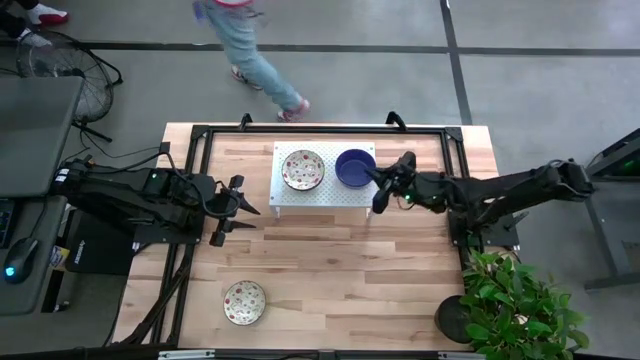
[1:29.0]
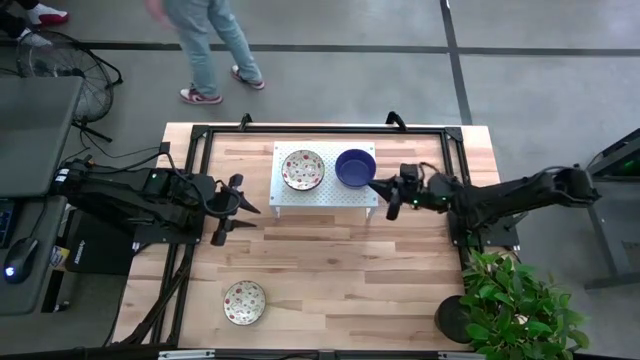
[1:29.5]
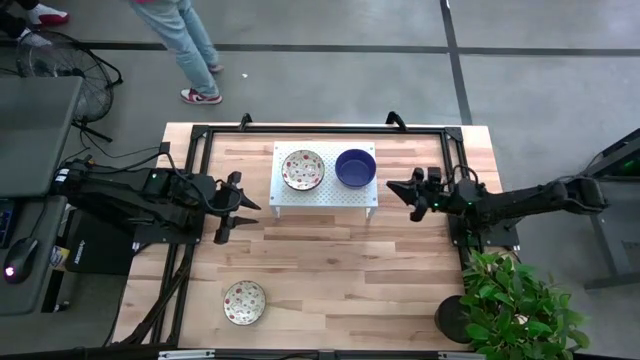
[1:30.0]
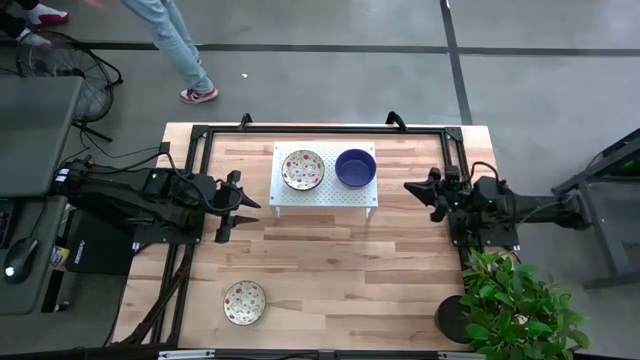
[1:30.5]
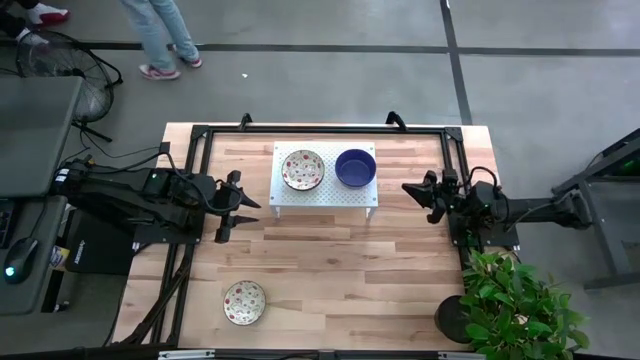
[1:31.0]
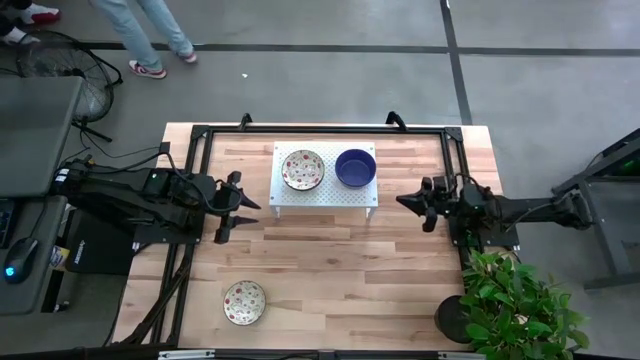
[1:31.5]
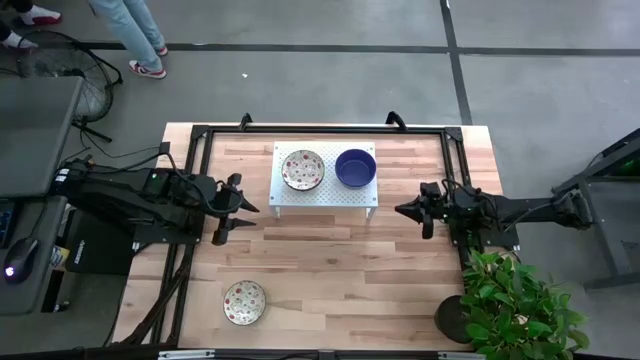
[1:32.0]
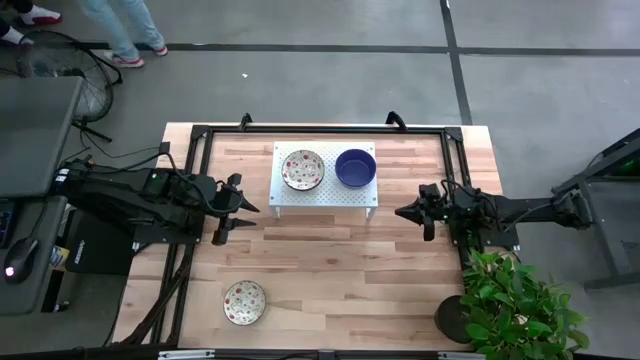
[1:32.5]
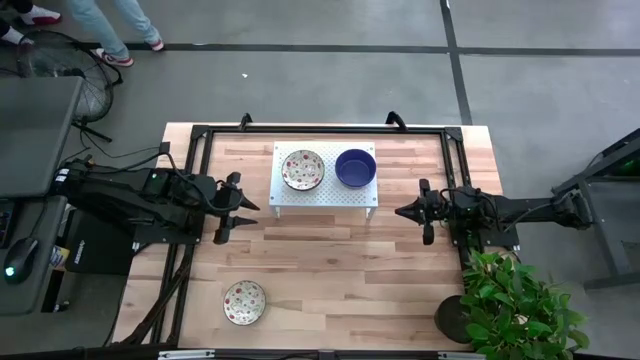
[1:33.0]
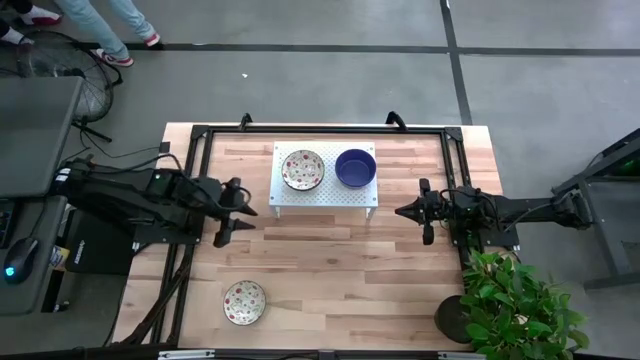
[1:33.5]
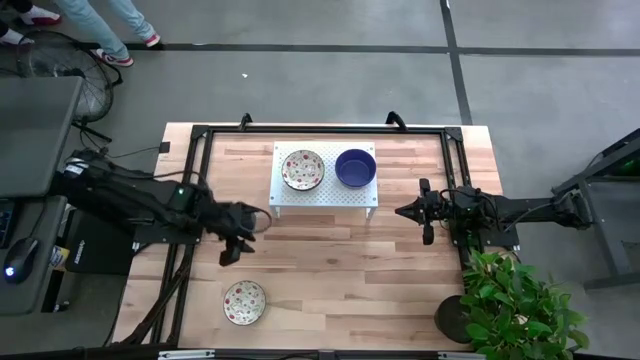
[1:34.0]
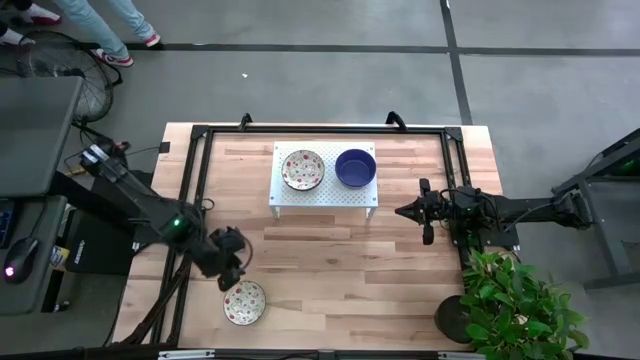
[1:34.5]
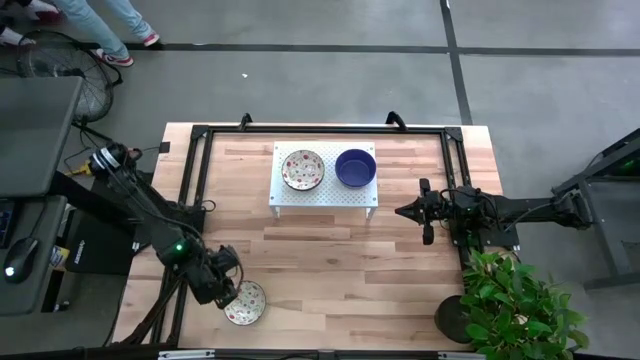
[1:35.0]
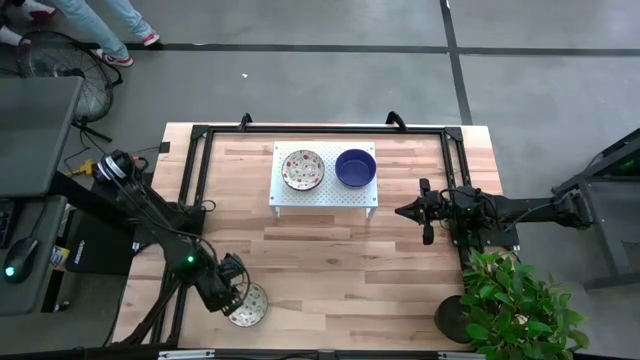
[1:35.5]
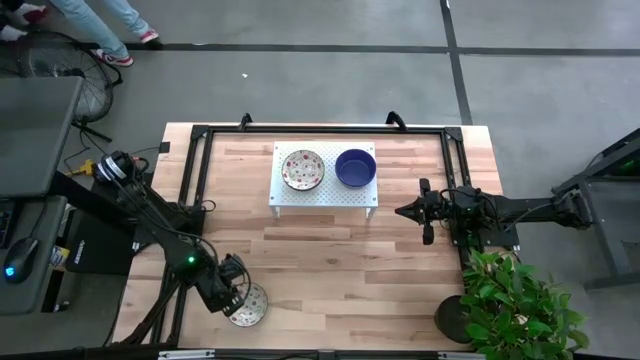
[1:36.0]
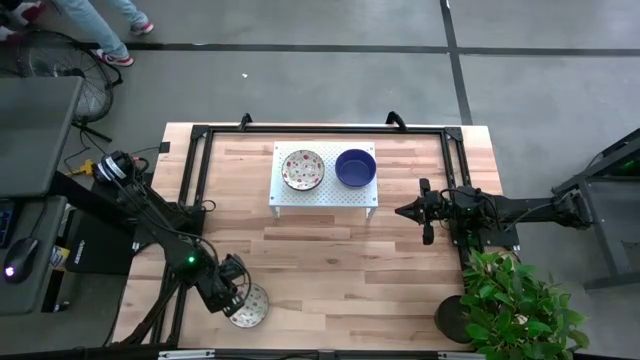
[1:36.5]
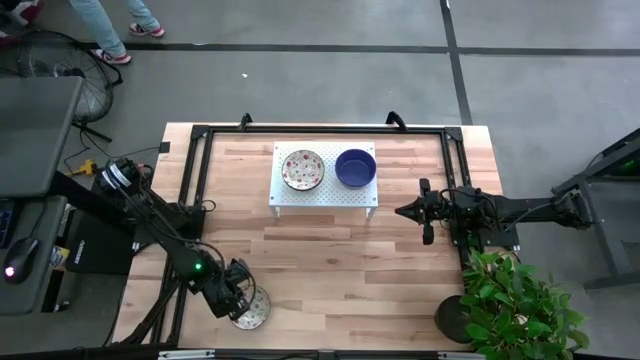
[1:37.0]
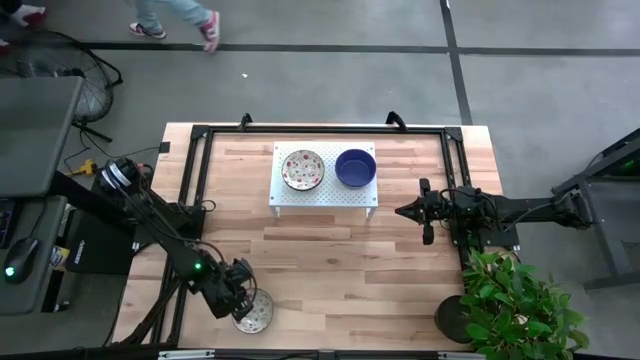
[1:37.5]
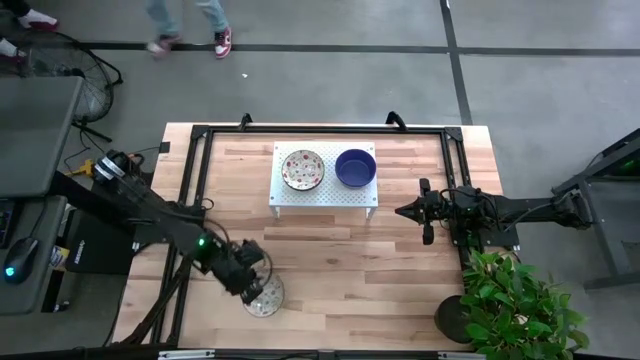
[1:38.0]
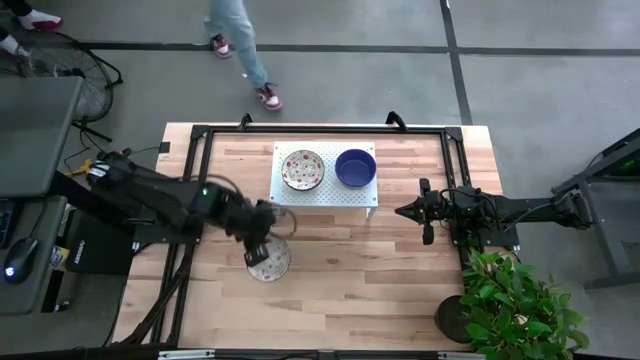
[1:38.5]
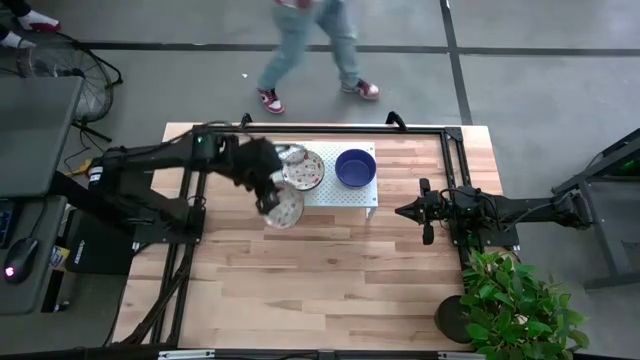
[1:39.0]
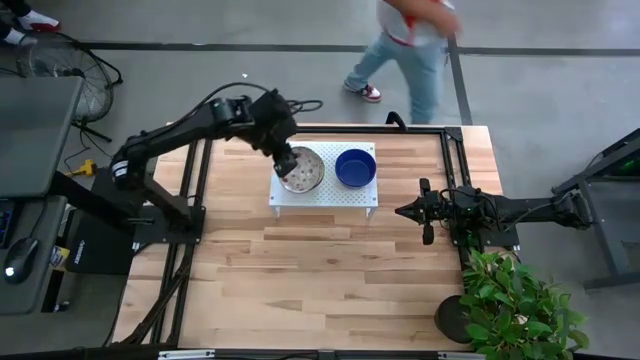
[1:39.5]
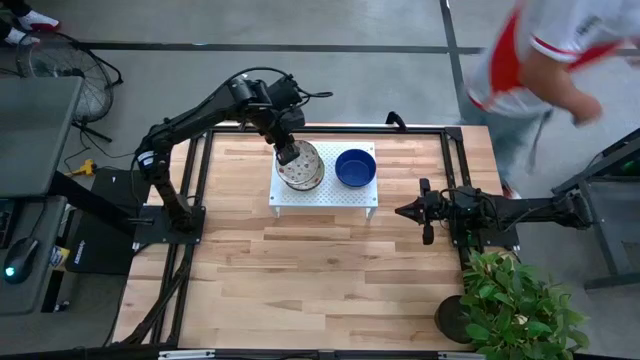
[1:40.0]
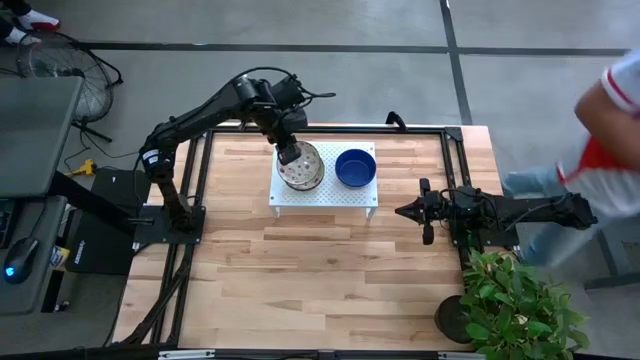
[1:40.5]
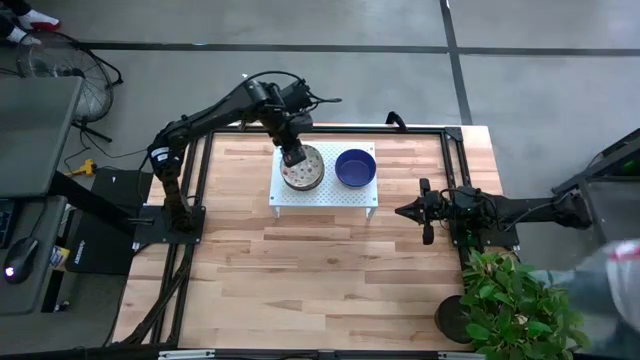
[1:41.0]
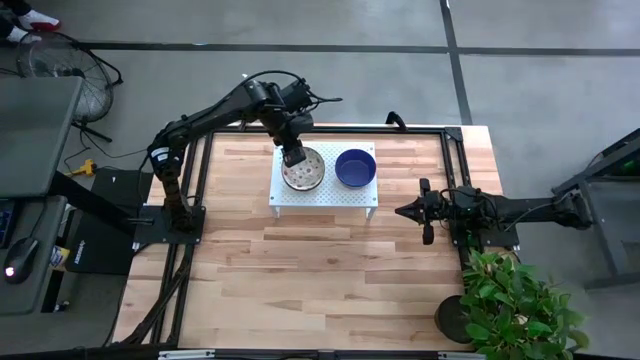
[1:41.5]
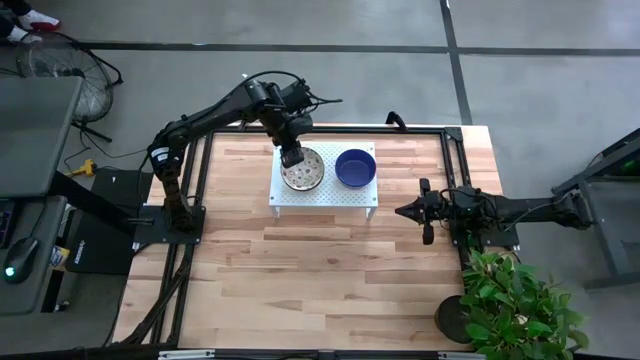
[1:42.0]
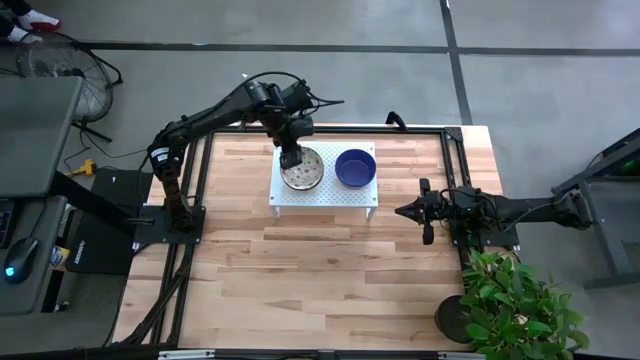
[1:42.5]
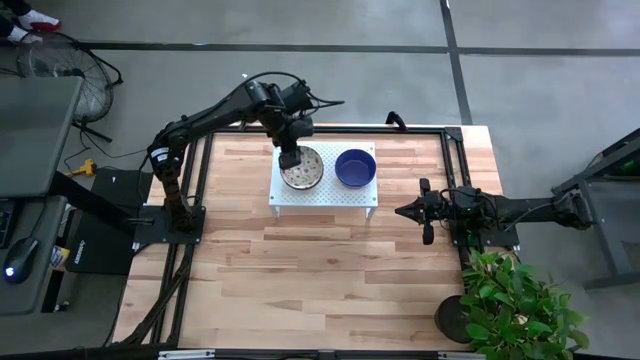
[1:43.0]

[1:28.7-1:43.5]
Task: Pick & Place Mini bowls
Stack the white patterned bowl on top of the white patterned bowls on the shelf

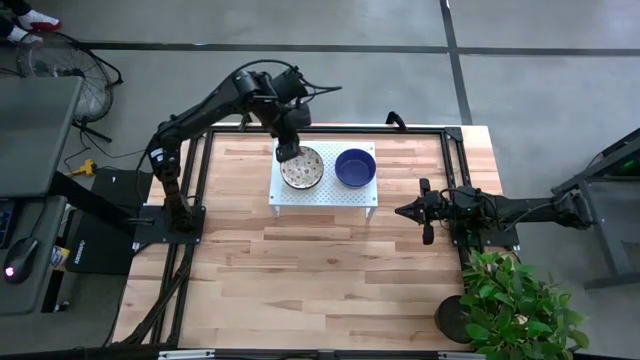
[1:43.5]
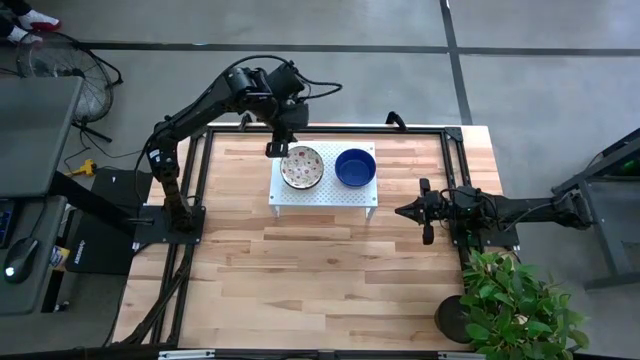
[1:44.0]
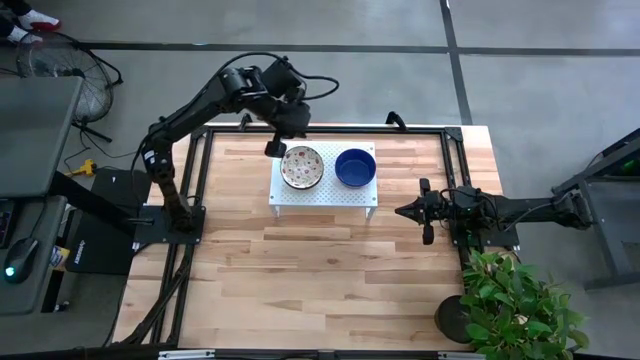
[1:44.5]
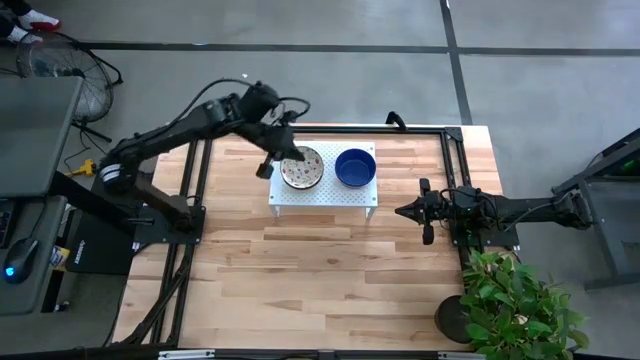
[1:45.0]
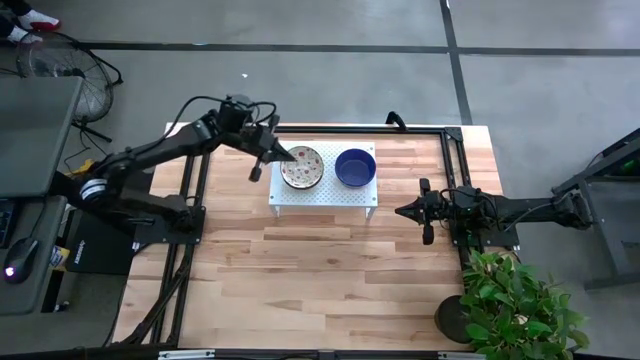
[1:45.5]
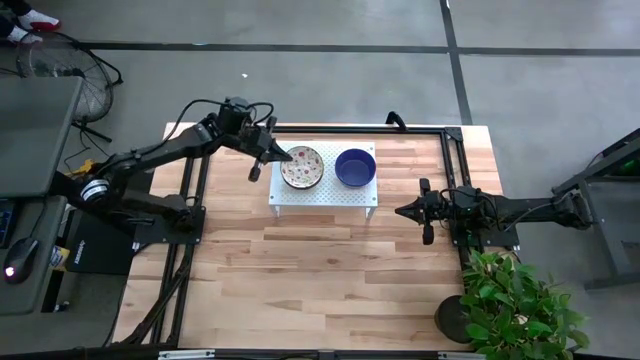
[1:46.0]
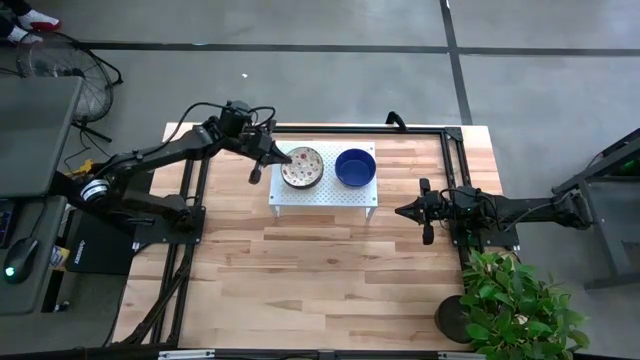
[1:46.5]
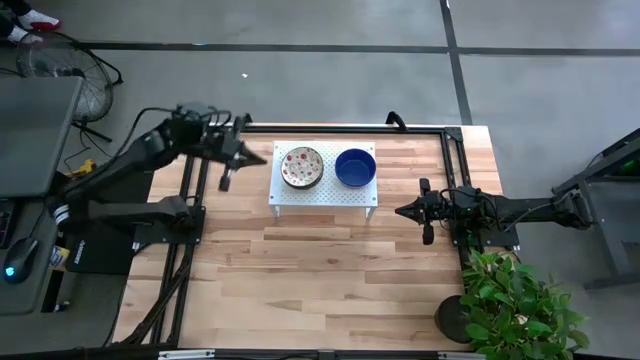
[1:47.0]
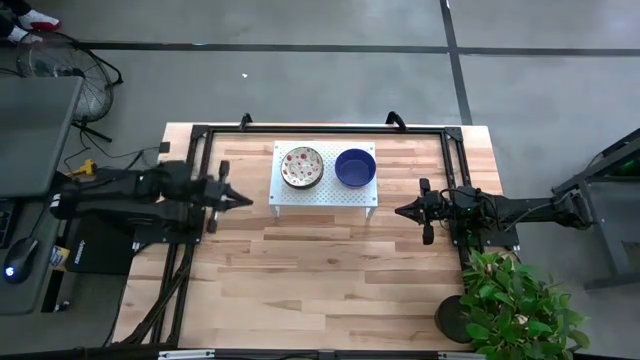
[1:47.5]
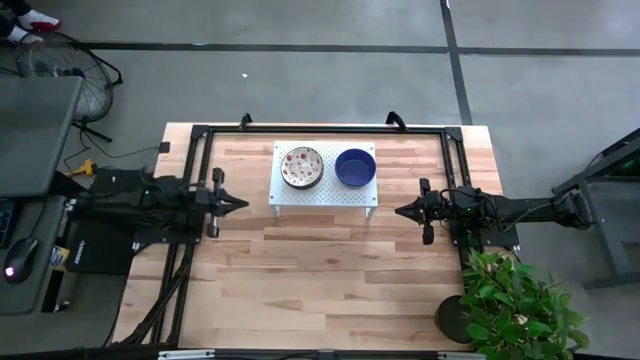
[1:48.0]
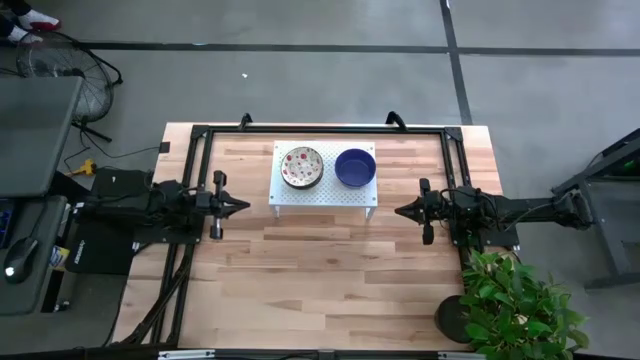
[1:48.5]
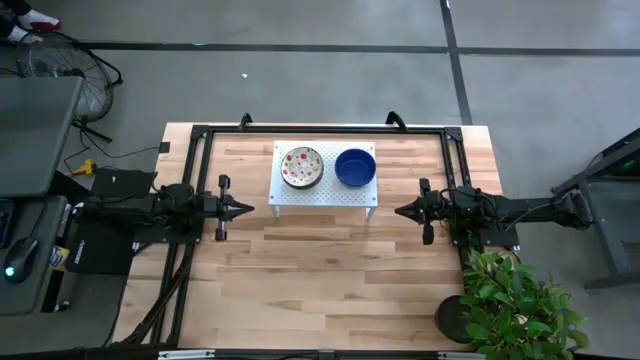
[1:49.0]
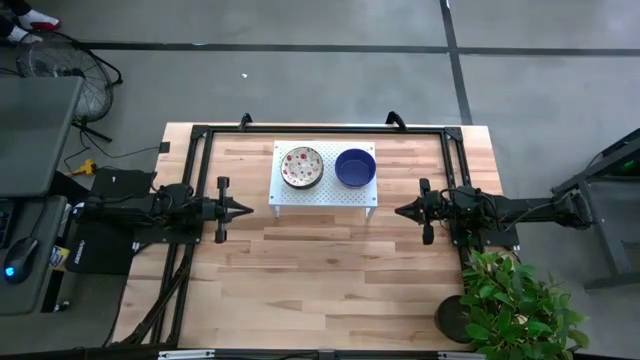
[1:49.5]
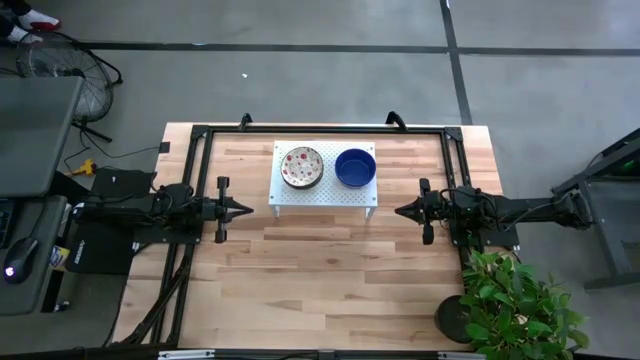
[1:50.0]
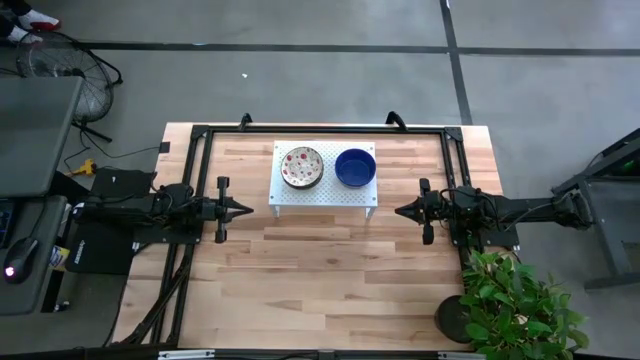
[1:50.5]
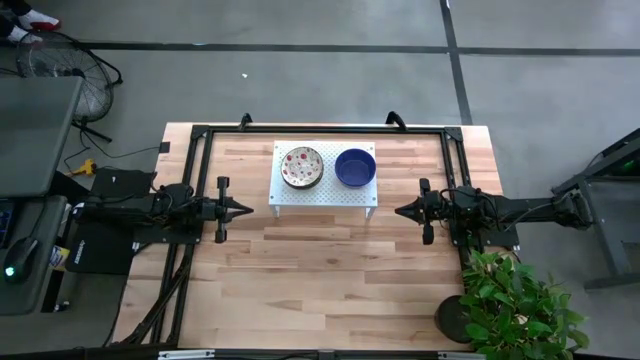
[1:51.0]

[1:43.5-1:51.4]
Return to Home Position
